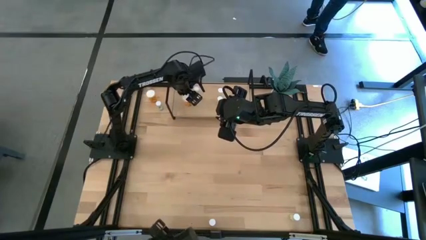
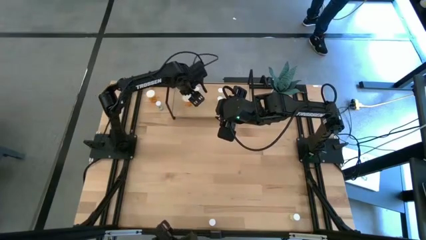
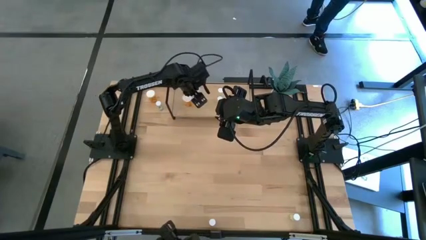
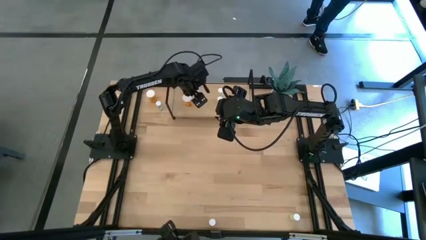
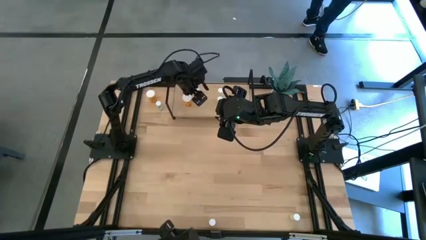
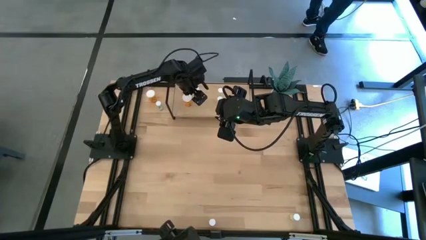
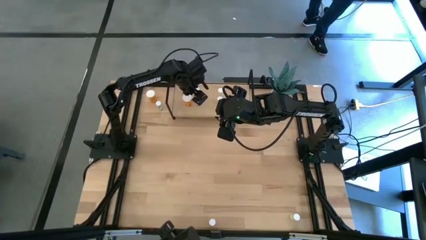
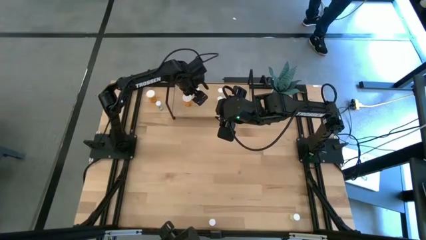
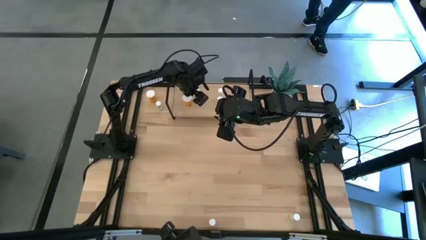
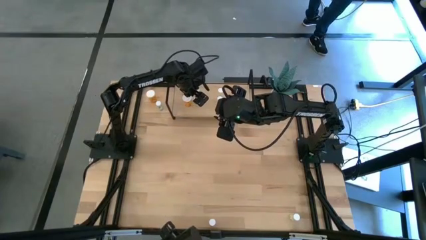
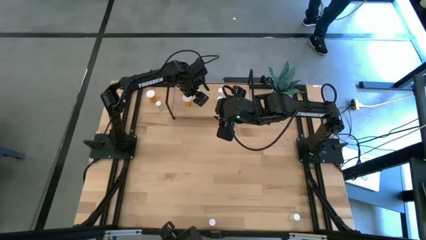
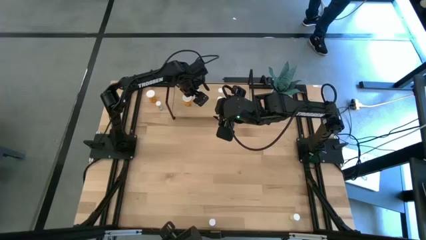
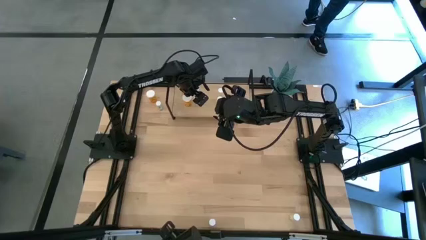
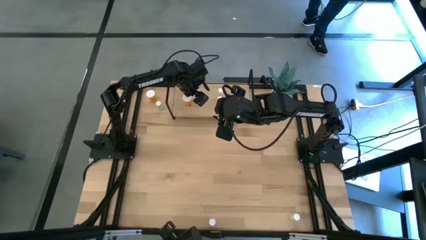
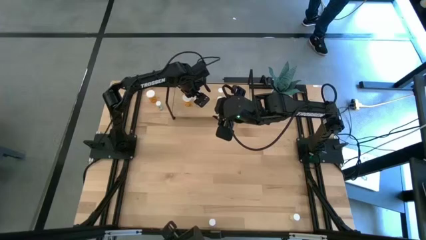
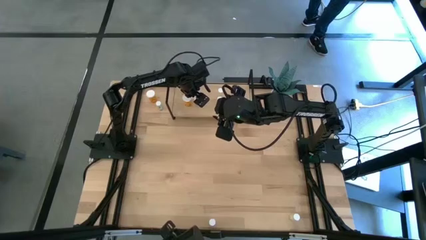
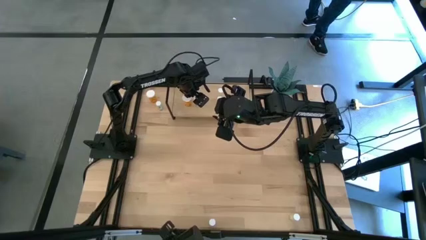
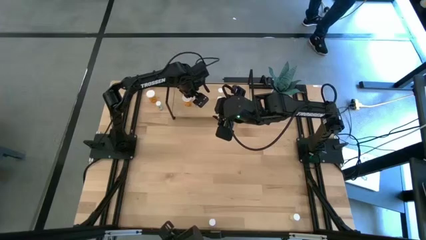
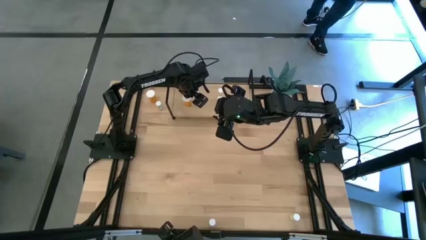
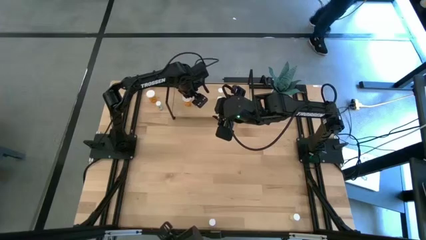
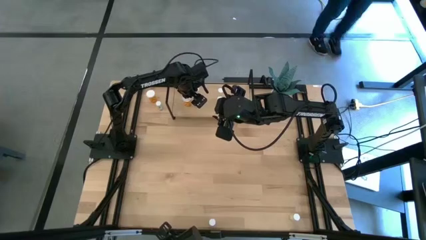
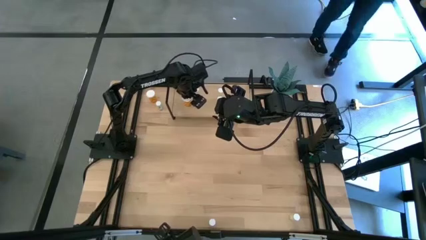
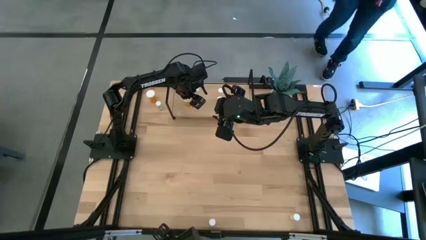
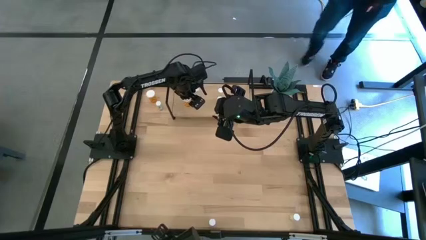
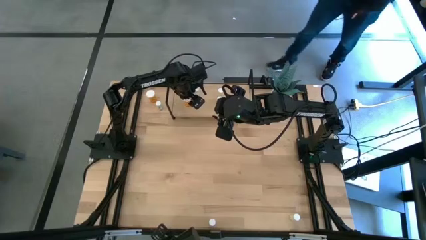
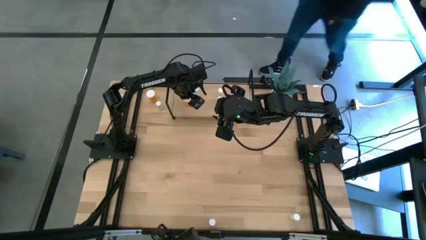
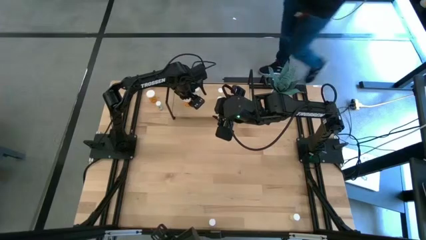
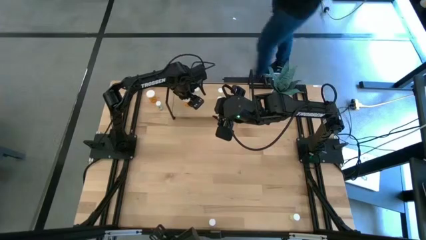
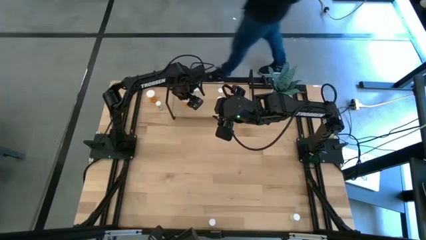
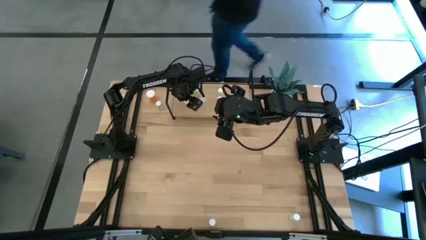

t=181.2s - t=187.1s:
Task: Pick and place medicine bottles onto shelf by color
Adjust the orange pill bottle on the shelf

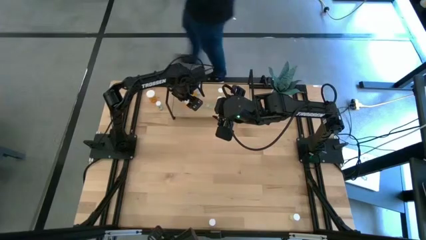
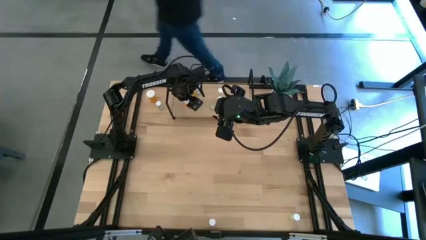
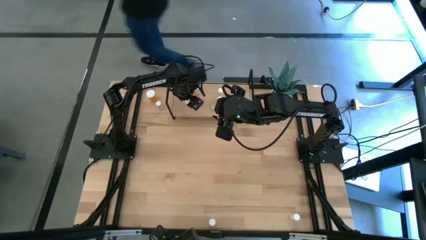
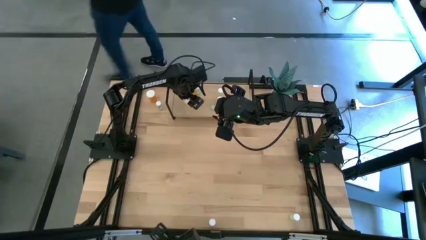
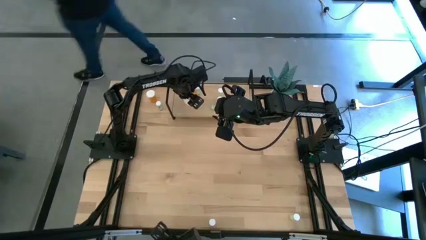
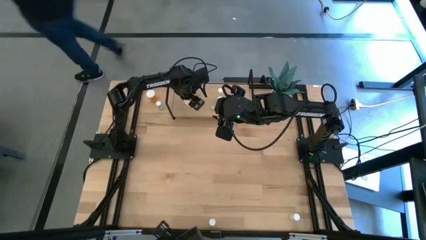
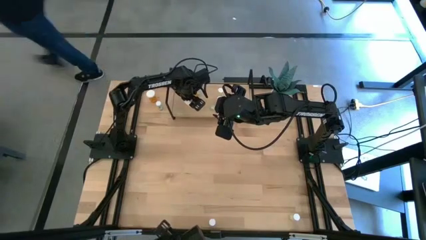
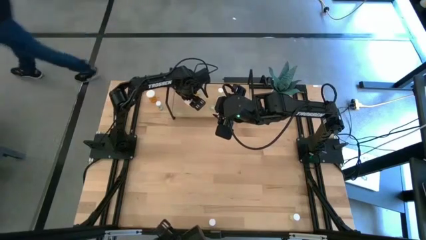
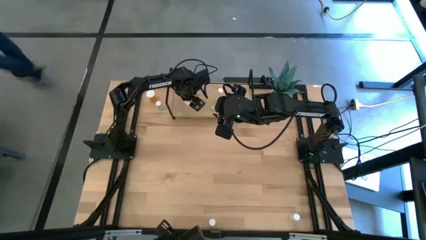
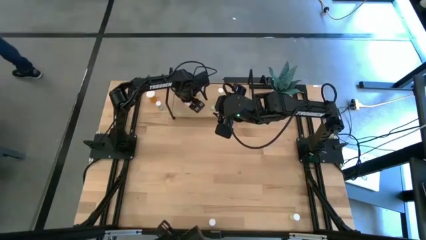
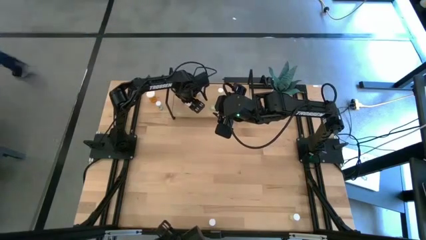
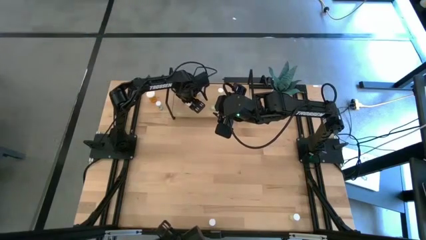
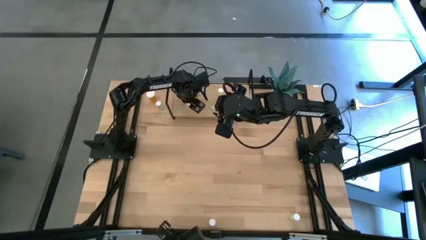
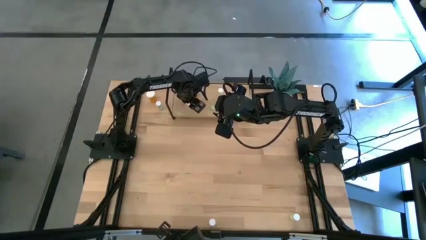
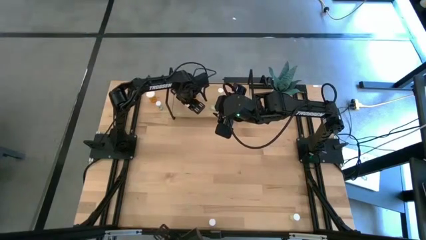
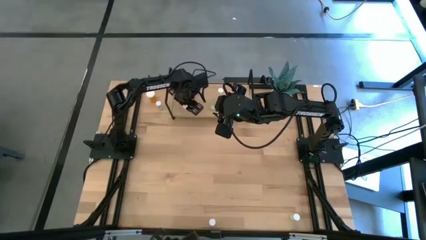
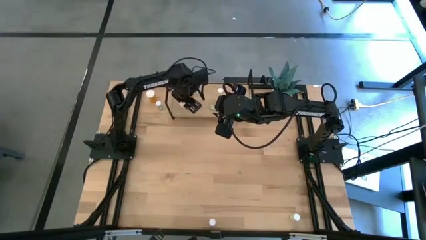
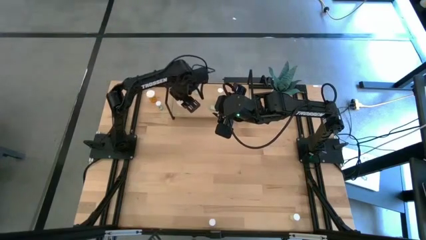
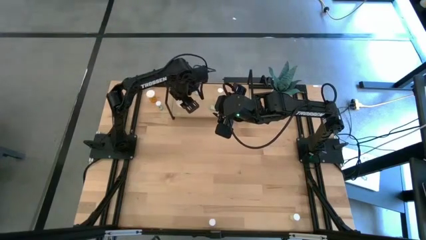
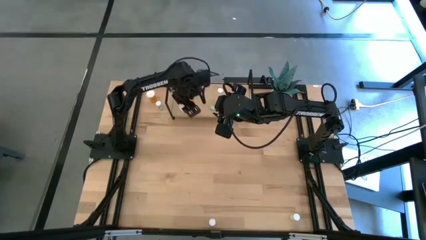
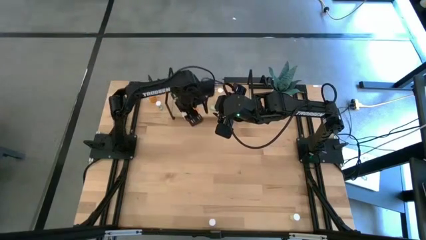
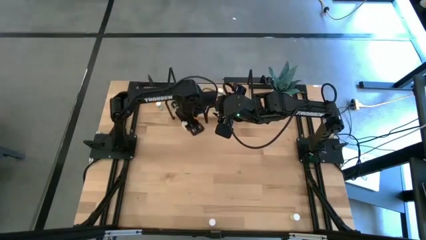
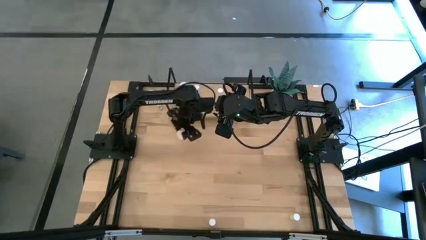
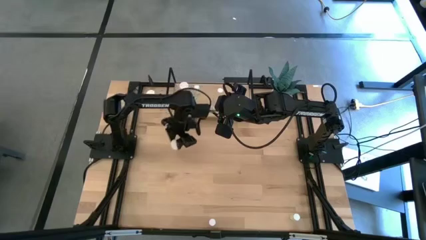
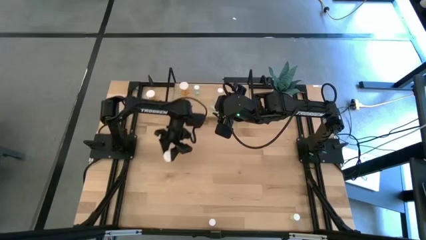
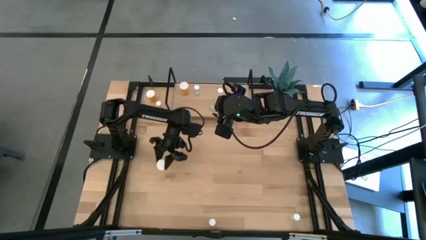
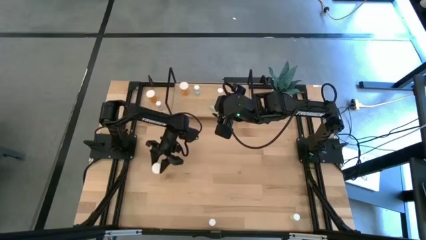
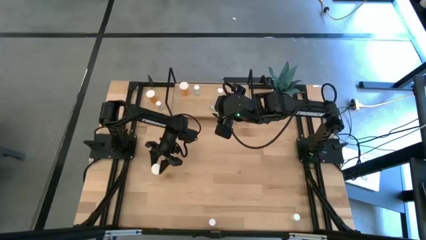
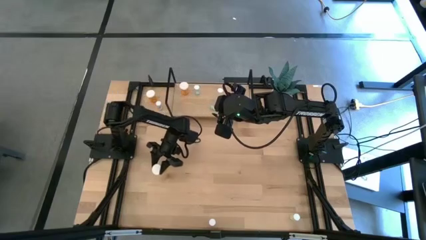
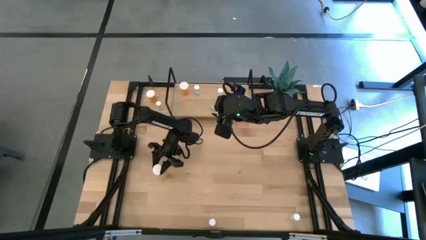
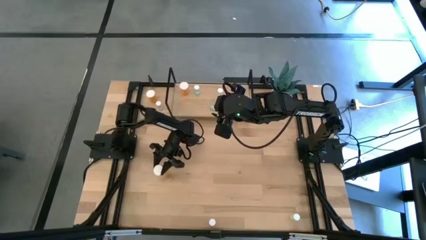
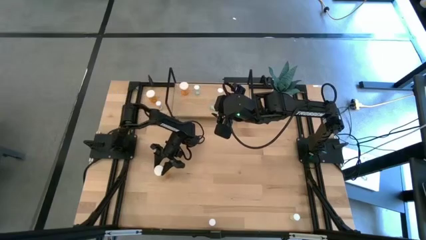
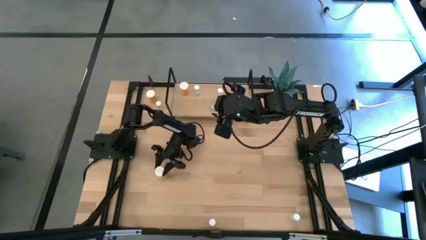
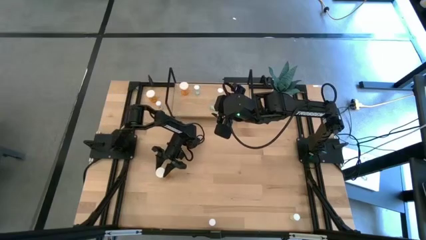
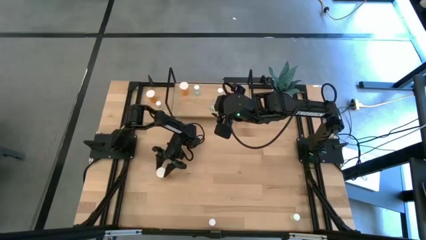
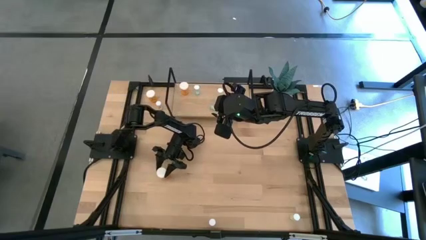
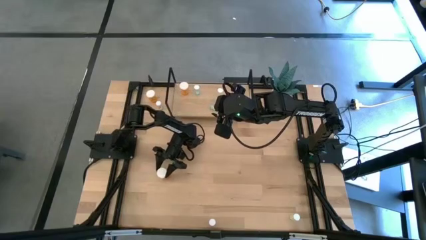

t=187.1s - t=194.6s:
Remove the orange pill bottle from the shelf
